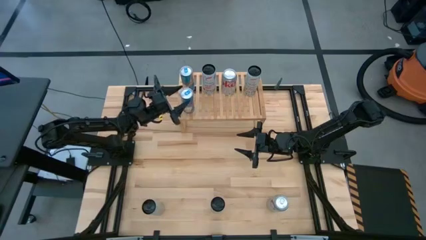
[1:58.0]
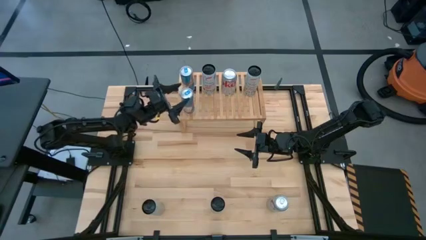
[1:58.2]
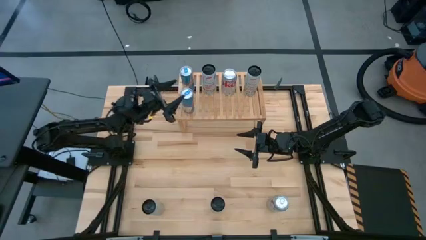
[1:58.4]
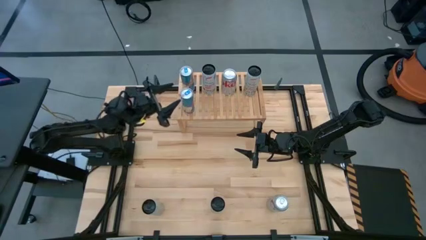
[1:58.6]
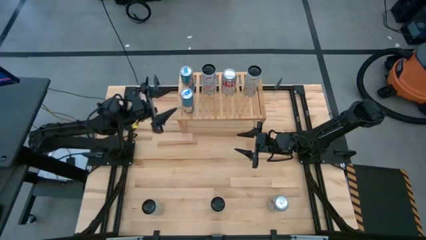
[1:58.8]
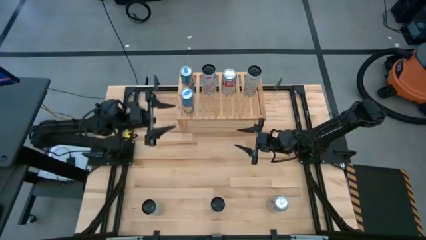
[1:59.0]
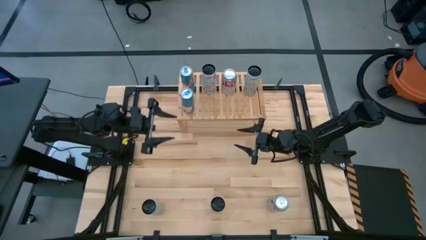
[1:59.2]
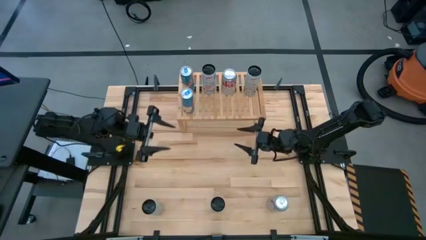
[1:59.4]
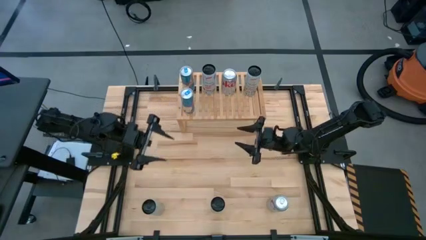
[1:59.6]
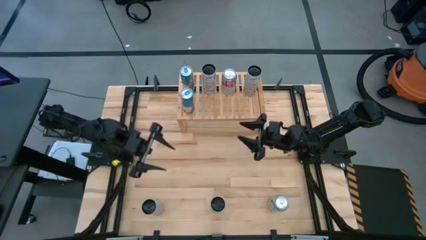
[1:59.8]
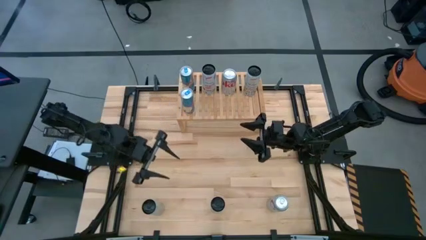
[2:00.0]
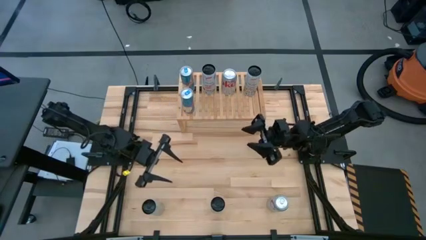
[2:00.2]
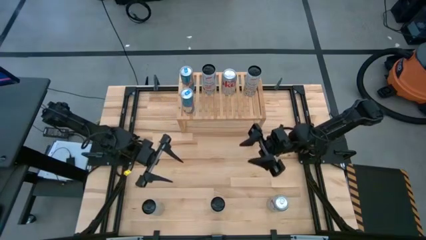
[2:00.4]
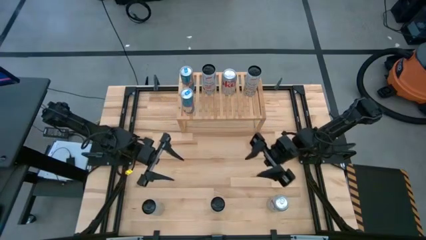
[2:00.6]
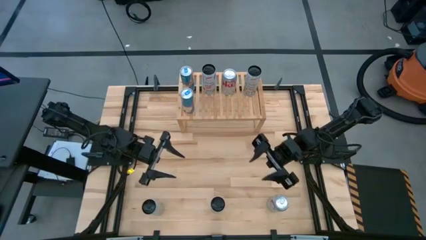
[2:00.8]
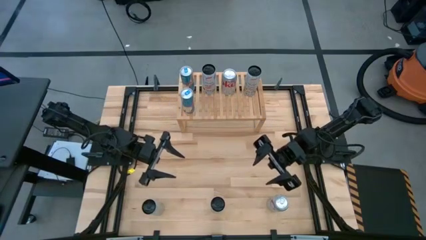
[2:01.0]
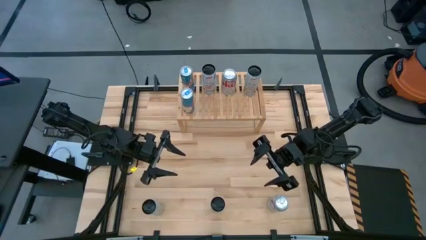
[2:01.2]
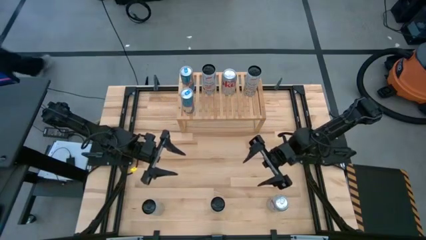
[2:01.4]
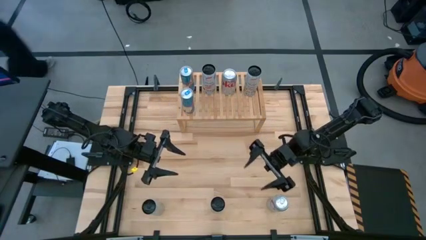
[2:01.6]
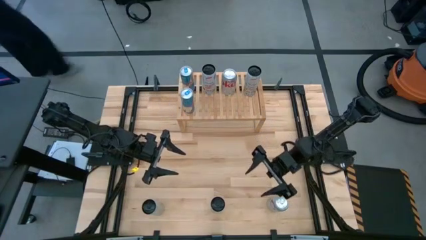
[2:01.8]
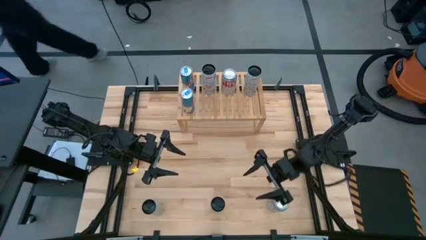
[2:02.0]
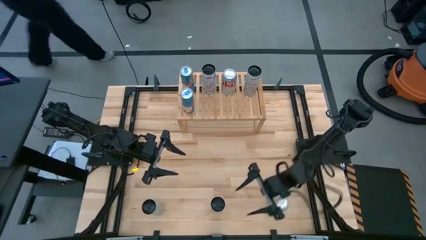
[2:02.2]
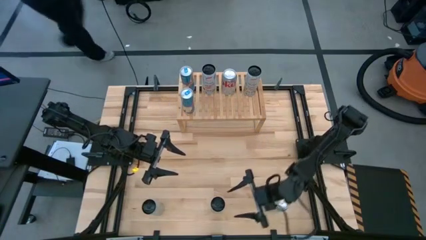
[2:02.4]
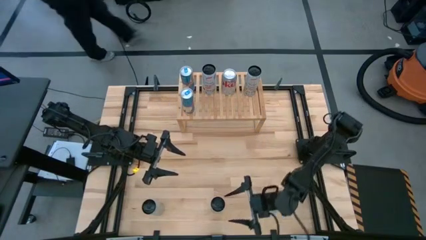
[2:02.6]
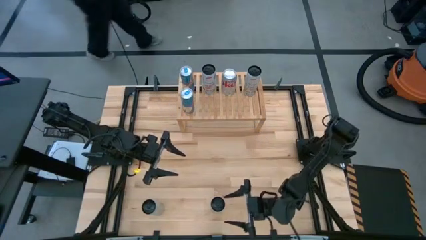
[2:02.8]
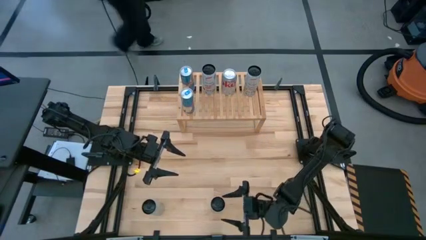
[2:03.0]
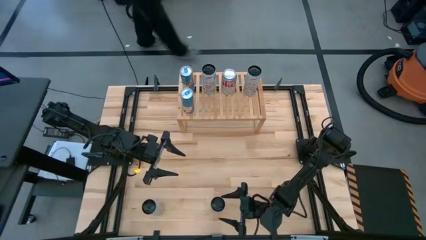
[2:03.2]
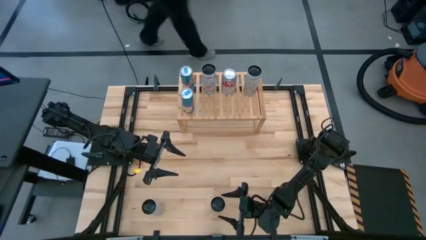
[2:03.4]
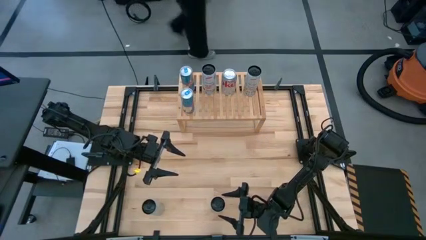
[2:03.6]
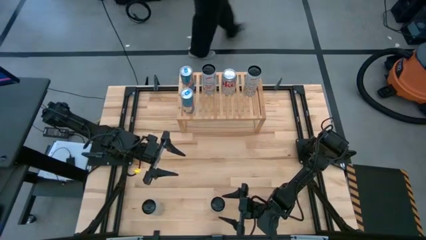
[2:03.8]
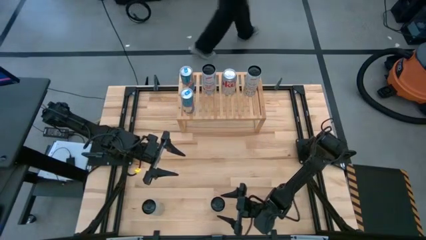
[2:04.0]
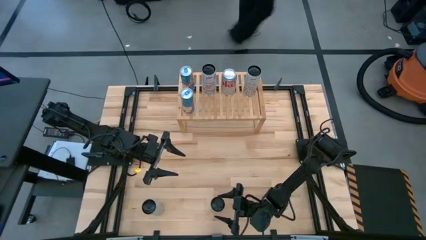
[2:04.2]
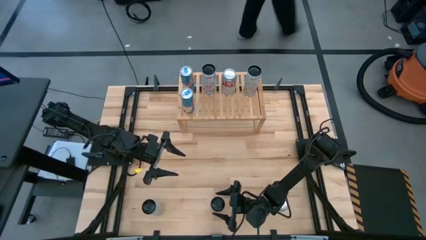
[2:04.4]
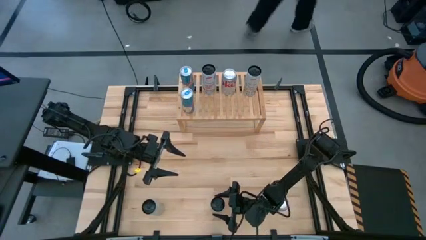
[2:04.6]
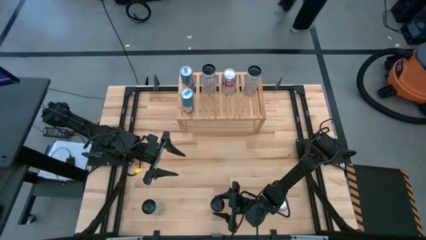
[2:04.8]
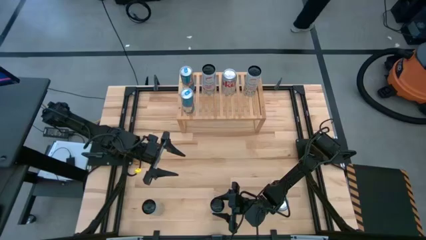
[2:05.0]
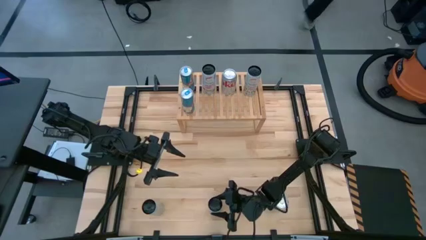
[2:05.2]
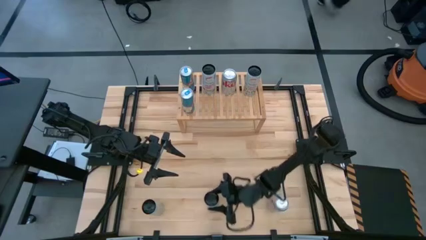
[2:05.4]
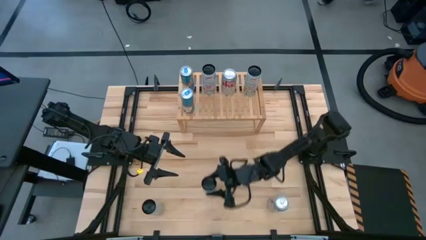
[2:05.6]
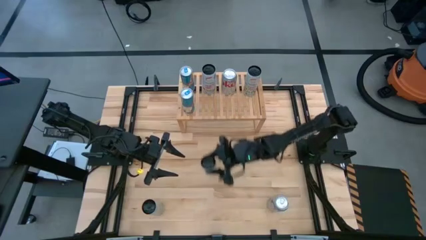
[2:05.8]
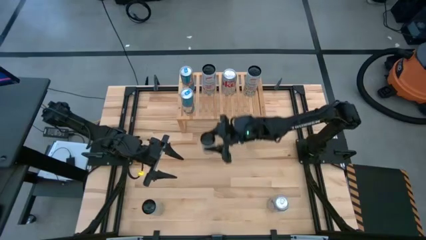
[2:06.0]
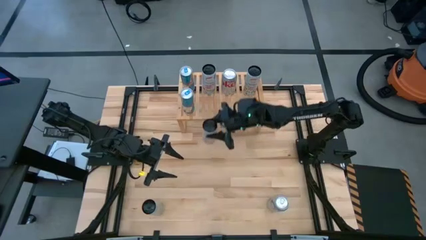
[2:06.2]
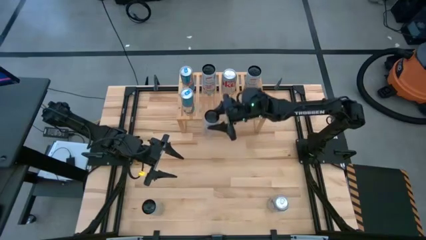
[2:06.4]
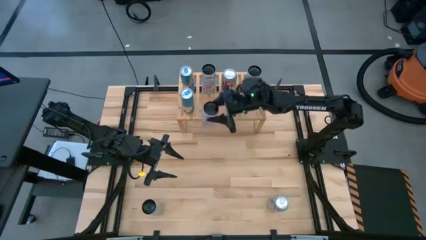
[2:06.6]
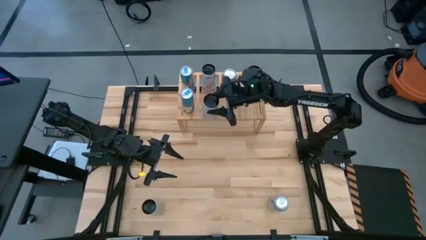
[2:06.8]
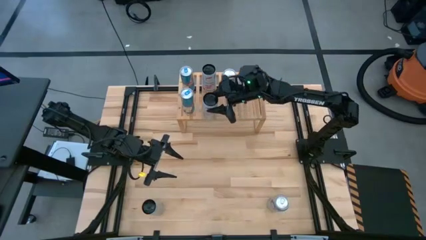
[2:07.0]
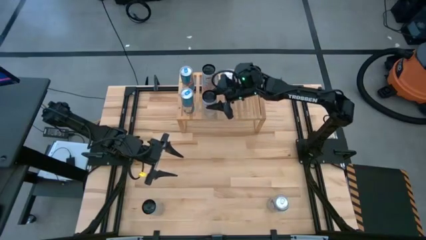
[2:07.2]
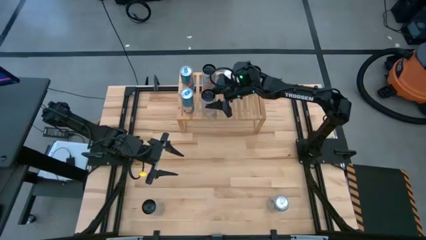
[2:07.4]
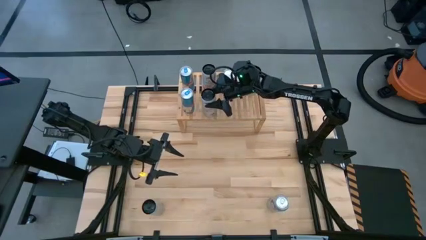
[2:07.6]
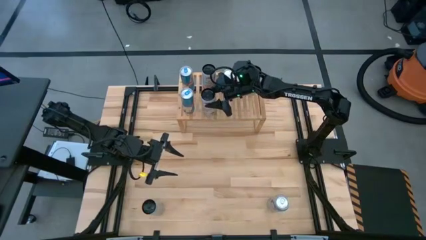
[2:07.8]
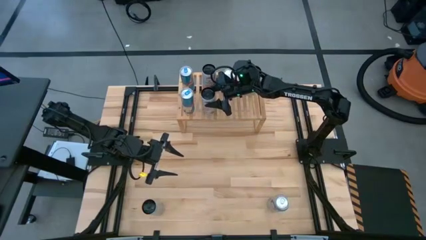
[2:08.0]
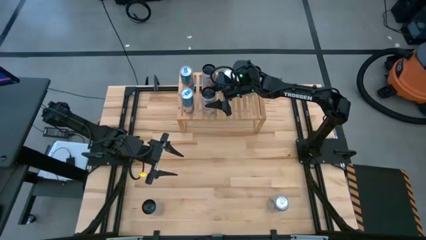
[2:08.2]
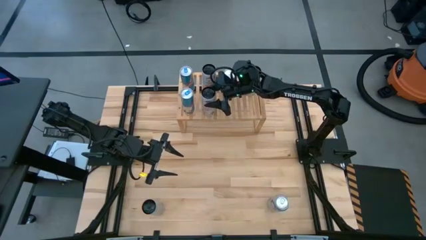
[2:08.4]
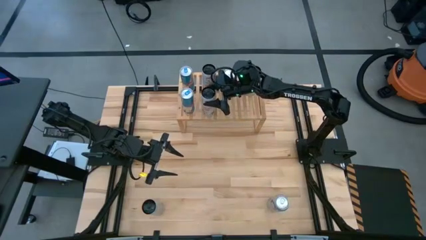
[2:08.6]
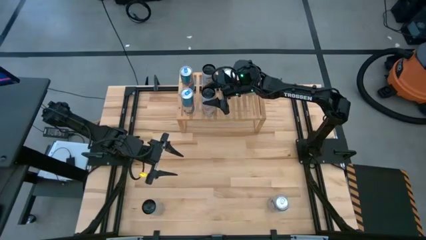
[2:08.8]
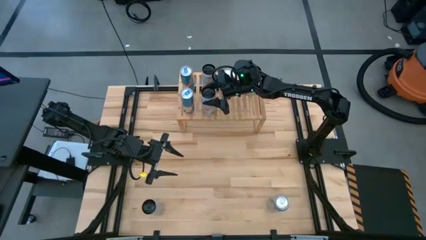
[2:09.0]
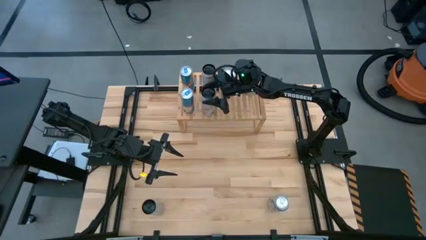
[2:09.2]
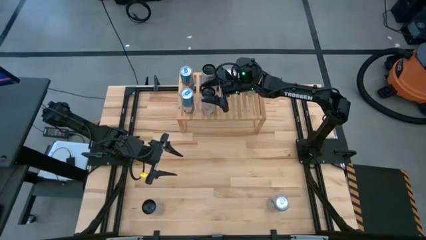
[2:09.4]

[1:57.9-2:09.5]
Task: Place canned beverage on shelf
Put the white and pink soda can on the shelf aligned with the white and pink soda can

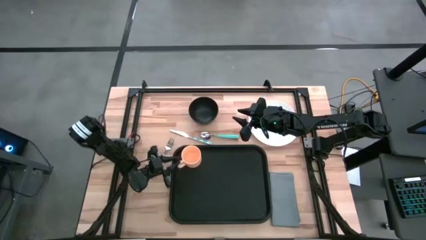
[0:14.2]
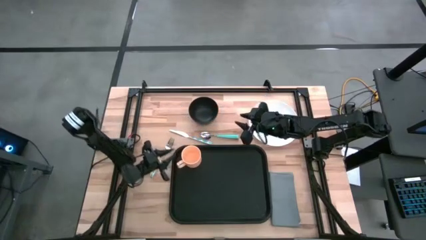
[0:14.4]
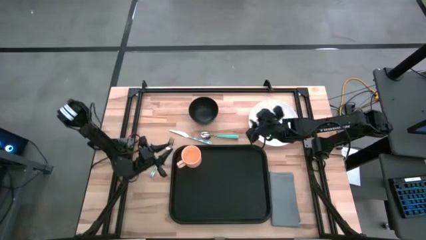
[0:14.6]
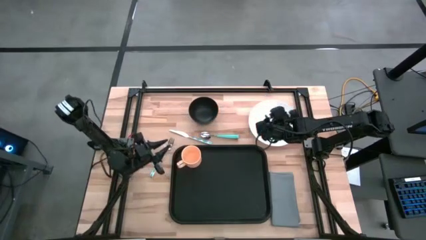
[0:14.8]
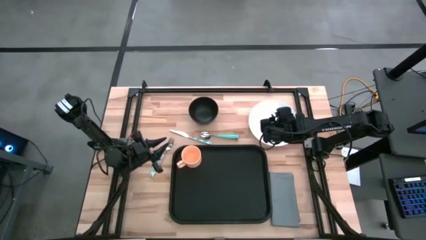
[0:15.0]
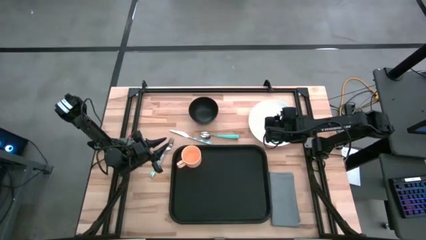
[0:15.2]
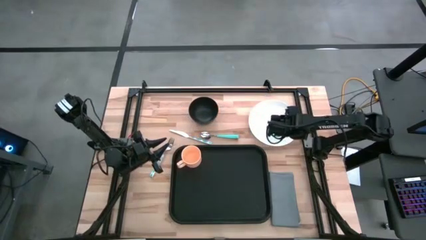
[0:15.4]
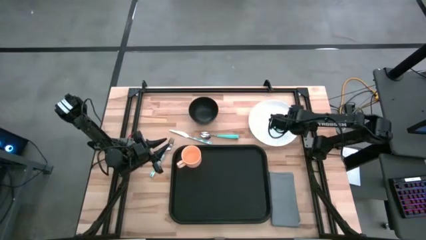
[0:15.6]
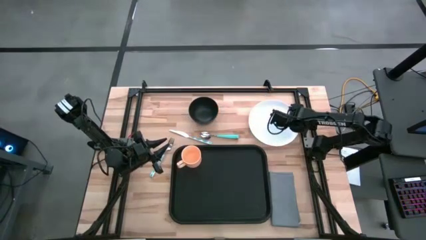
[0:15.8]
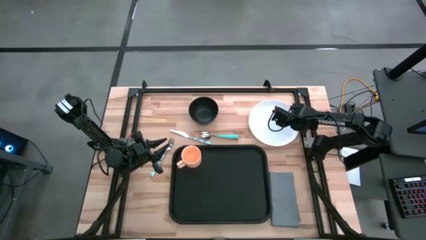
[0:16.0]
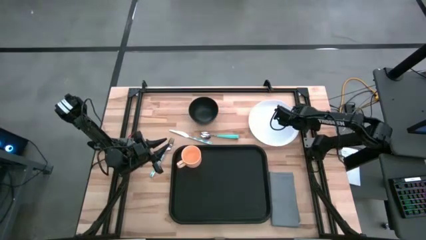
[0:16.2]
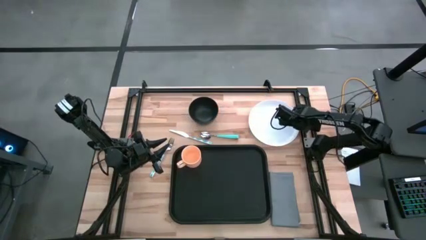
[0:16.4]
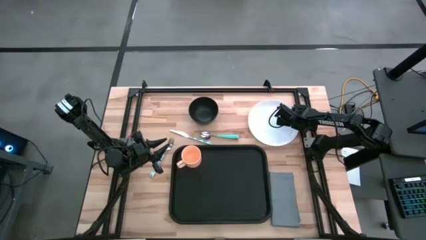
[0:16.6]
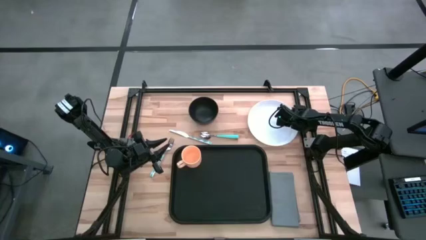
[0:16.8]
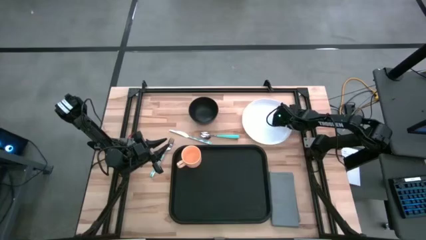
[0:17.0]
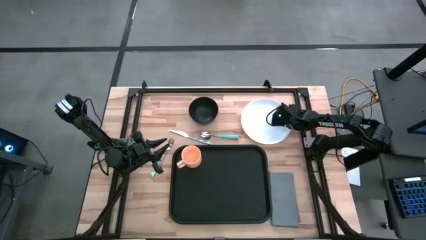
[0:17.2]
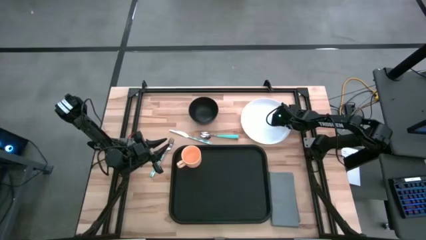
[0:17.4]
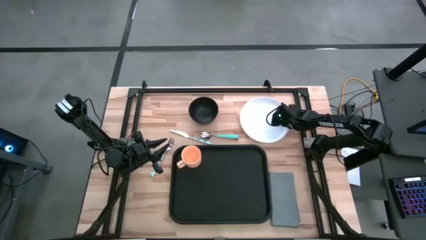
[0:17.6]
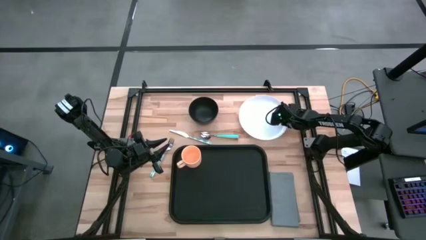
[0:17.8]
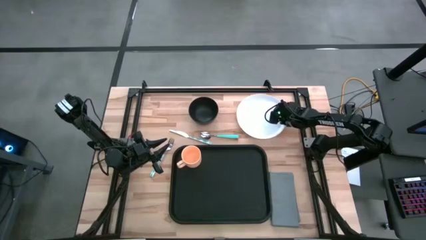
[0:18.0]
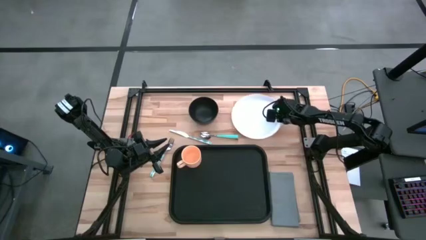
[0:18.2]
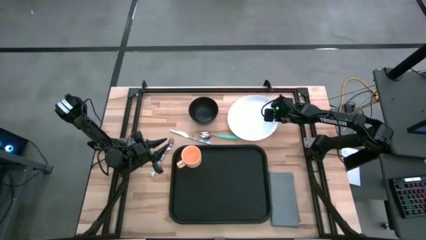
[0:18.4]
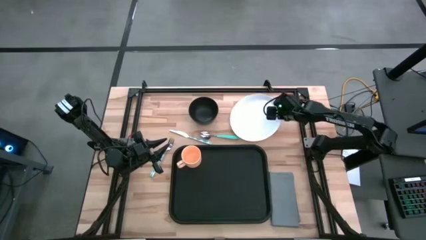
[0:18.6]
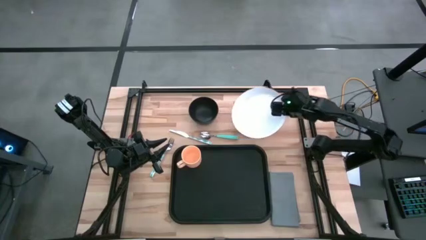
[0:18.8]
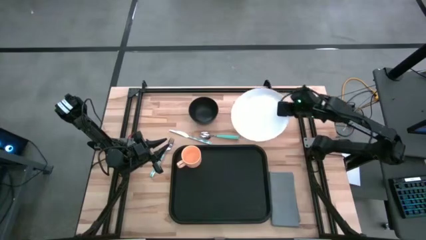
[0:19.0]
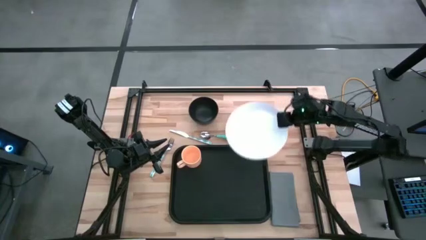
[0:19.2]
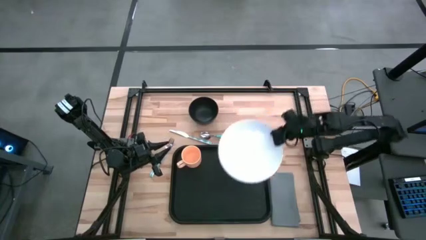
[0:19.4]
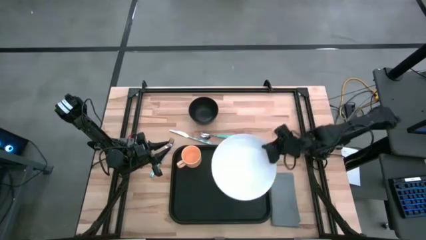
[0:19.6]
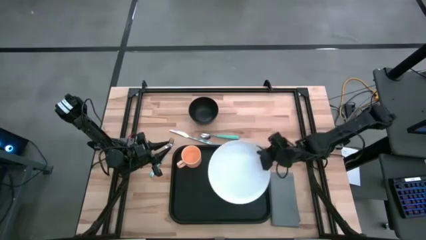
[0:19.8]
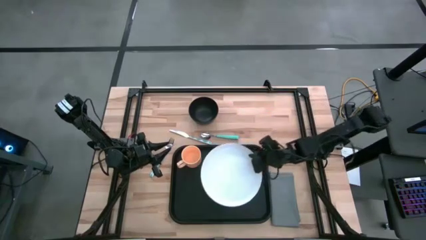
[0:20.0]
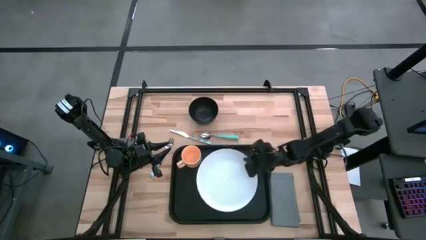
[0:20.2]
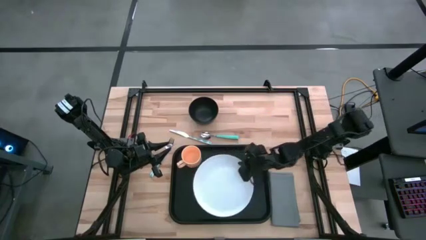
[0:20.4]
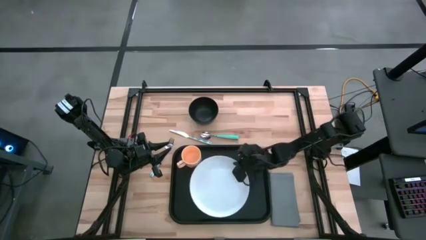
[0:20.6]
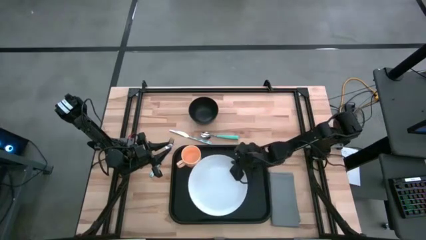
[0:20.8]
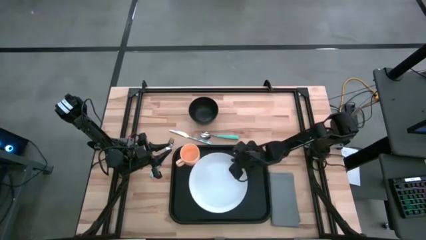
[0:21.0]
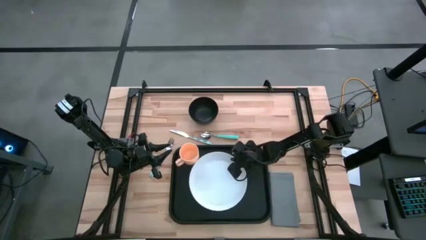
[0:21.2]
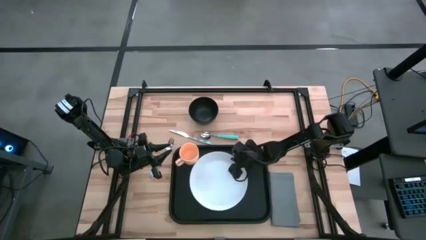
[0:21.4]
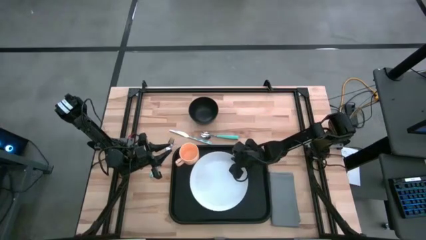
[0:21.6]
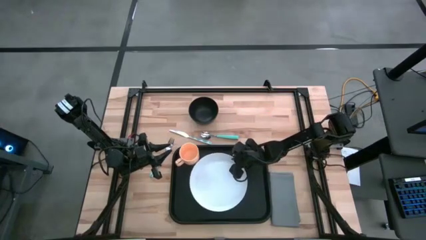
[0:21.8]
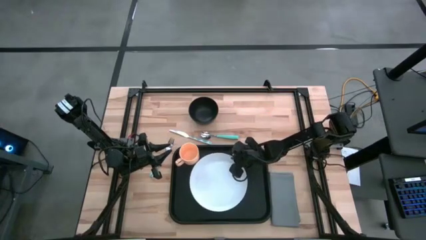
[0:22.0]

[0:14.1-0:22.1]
Task: Set up tray
Put the white plate on the black tray to the bottom right of the yellow mug
